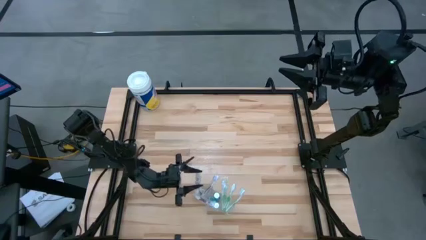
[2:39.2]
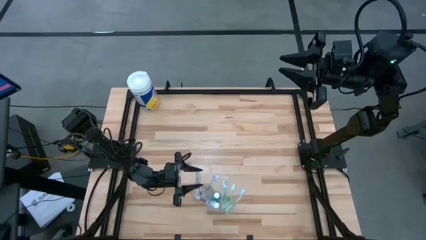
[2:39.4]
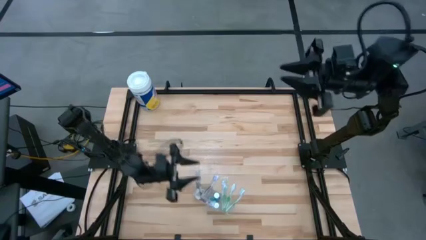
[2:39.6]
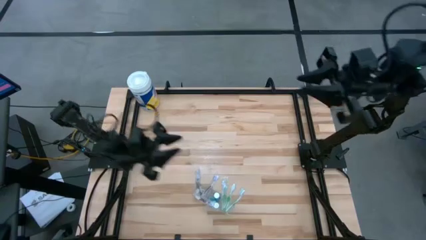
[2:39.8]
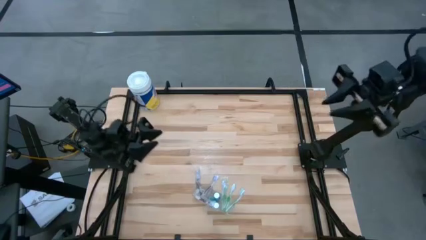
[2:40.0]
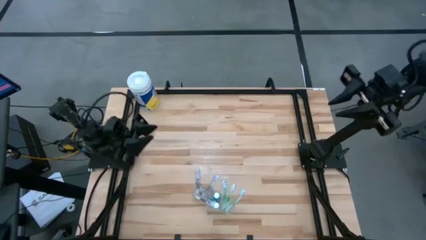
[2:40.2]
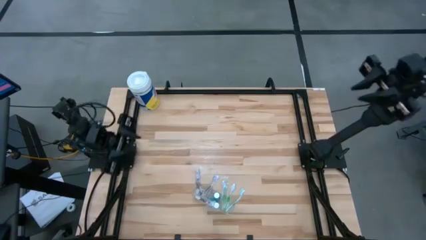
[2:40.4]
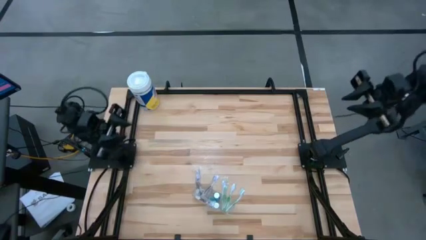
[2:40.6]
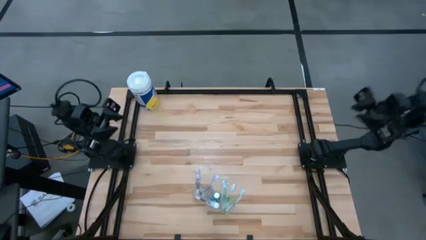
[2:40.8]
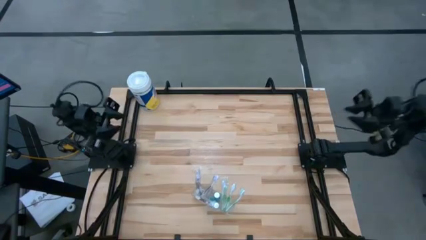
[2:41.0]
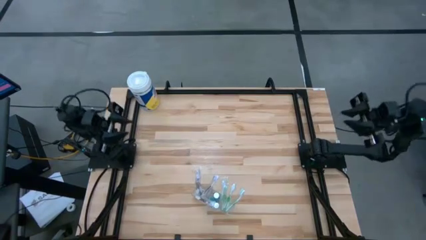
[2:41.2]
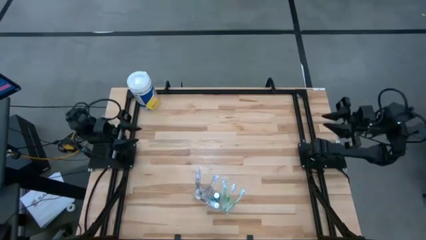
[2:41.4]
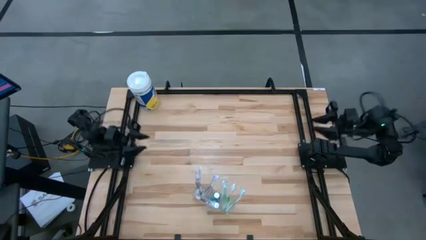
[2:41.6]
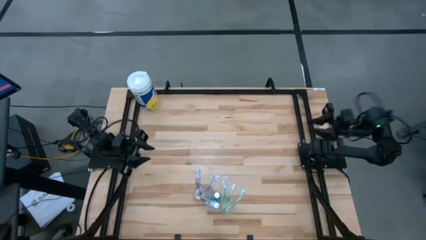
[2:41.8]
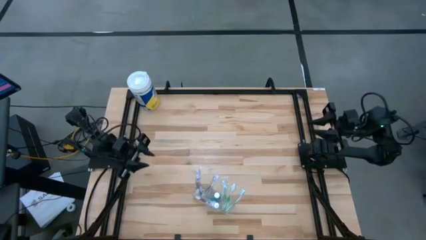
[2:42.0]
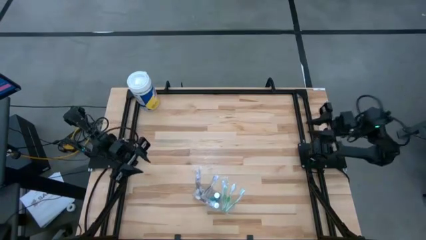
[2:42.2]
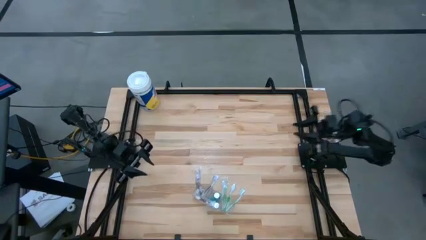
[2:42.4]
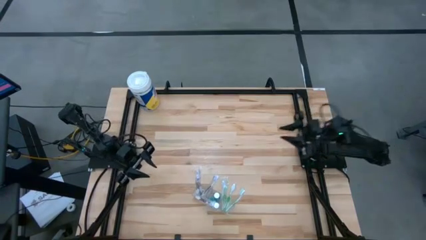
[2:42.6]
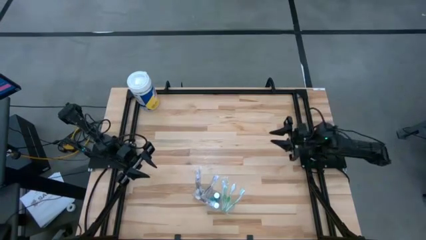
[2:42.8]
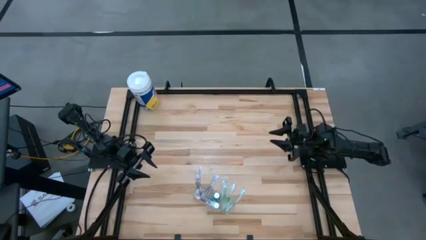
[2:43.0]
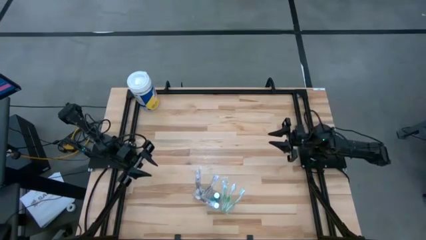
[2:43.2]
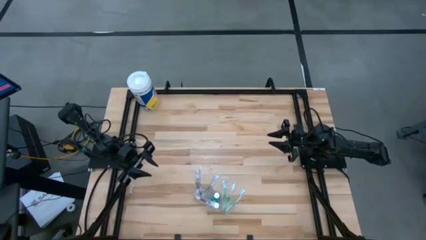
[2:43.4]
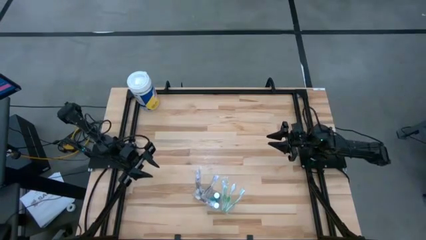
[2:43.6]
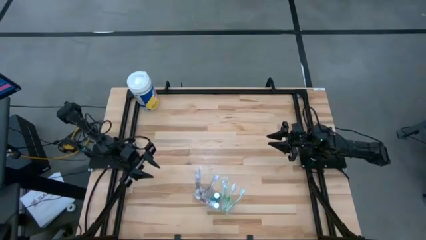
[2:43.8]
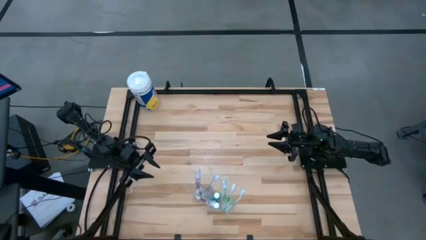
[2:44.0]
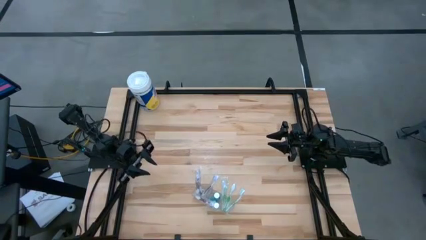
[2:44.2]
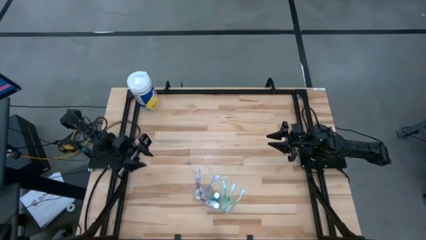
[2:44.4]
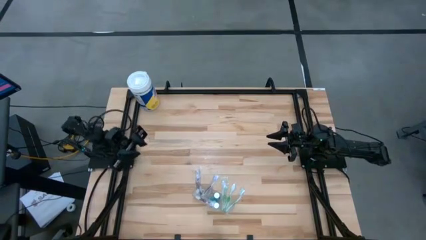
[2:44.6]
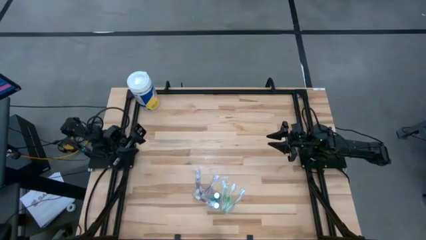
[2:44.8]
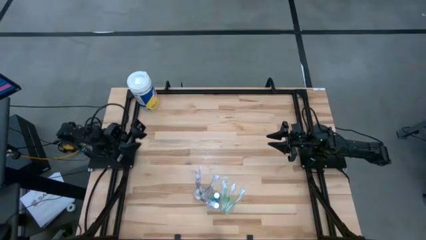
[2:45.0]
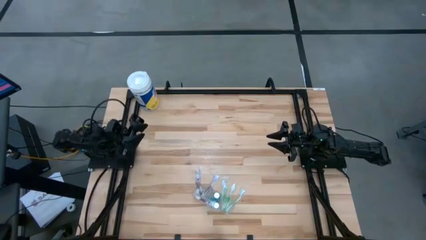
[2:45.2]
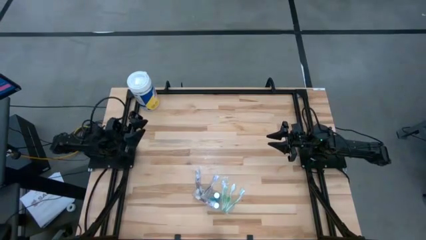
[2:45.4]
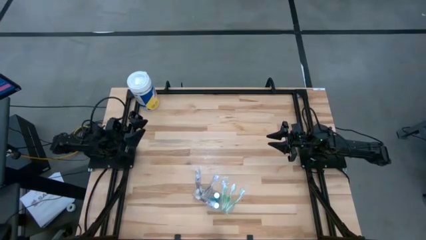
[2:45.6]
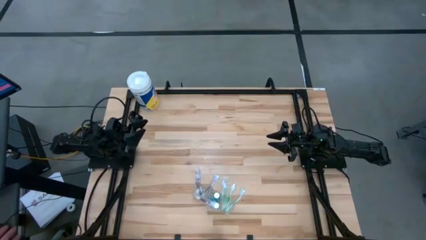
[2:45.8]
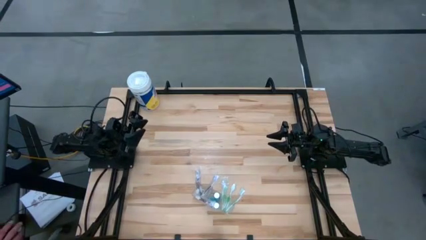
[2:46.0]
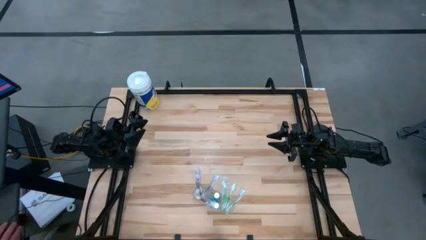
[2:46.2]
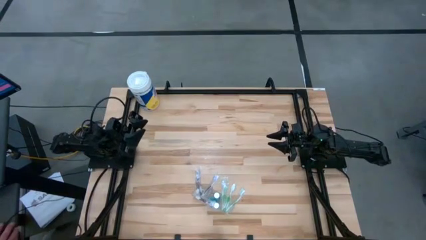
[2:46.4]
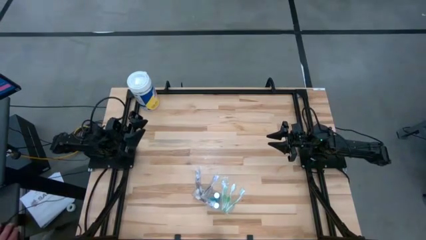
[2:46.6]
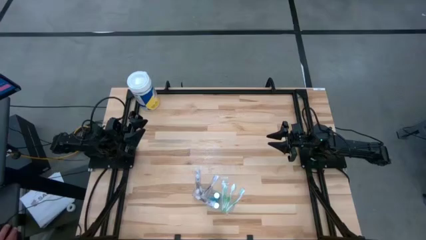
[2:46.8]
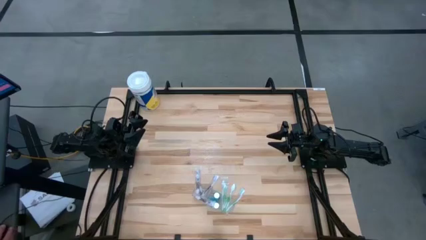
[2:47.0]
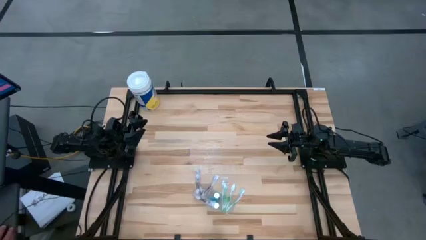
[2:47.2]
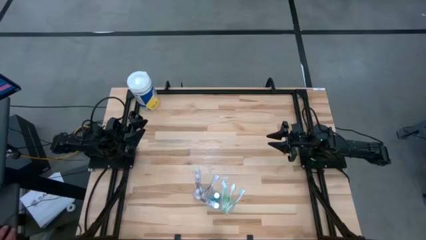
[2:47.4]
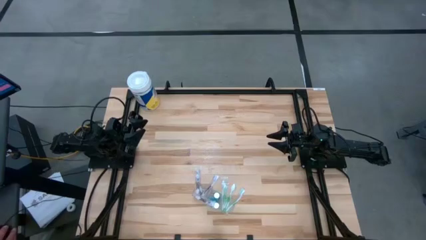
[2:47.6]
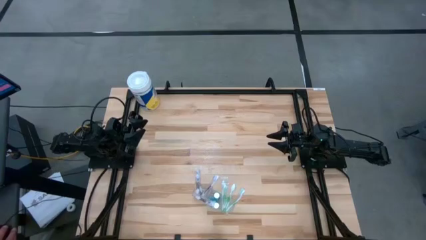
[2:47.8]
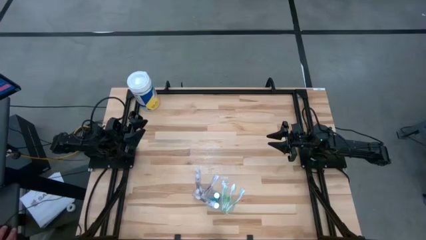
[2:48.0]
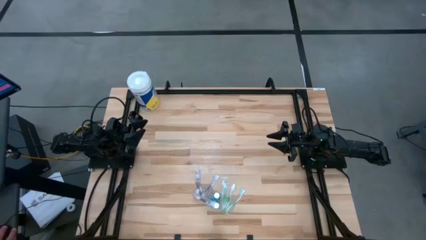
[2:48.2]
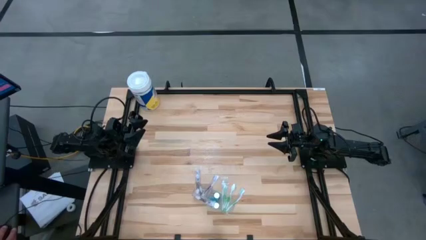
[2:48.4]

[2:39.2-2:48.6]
Task: Pick & Place toothbrushing station
Return to Home Position

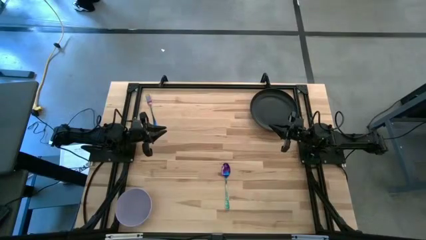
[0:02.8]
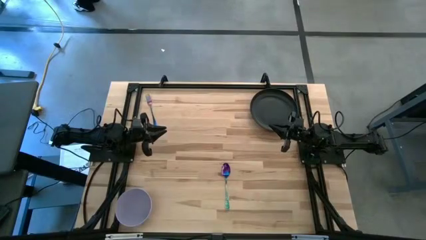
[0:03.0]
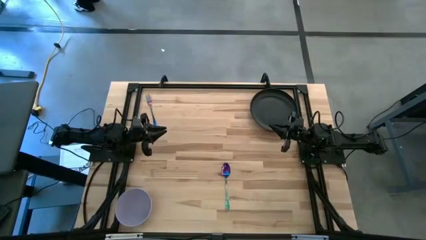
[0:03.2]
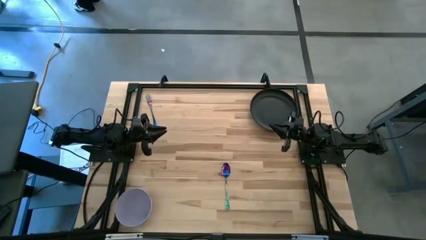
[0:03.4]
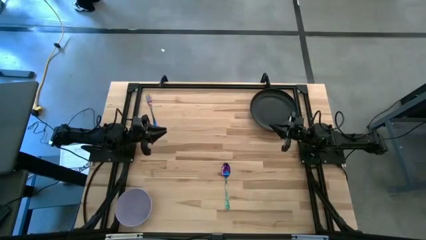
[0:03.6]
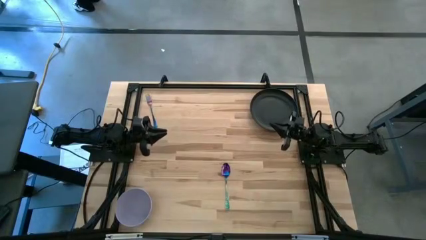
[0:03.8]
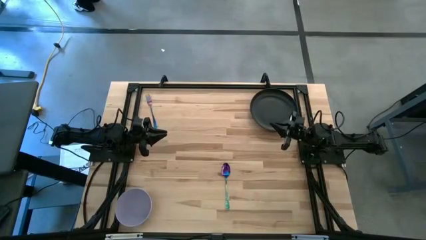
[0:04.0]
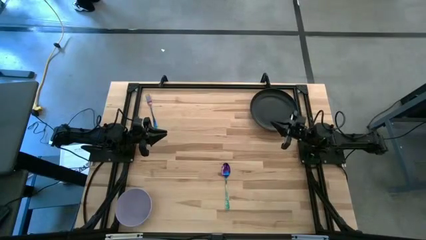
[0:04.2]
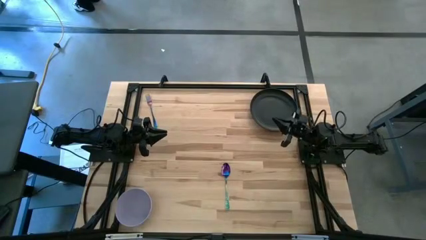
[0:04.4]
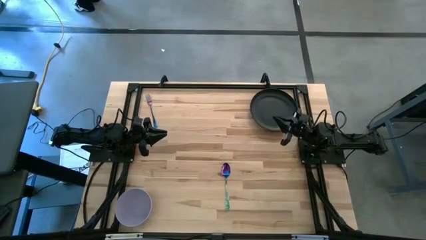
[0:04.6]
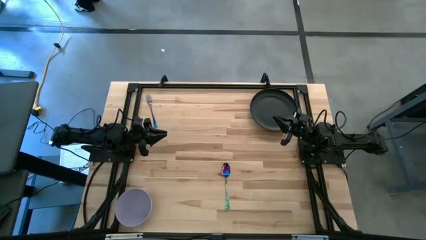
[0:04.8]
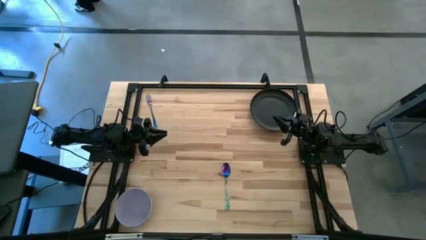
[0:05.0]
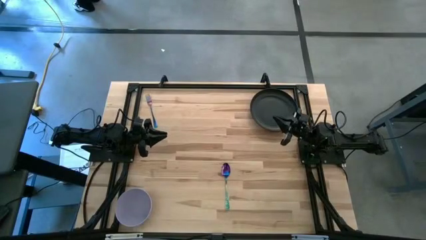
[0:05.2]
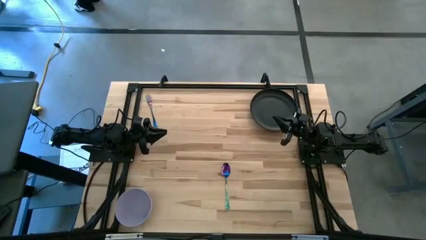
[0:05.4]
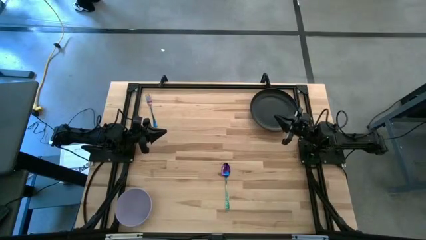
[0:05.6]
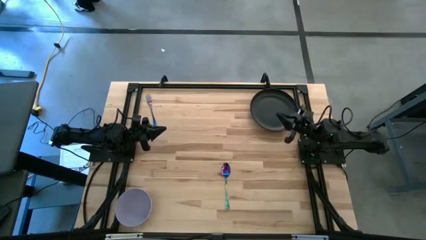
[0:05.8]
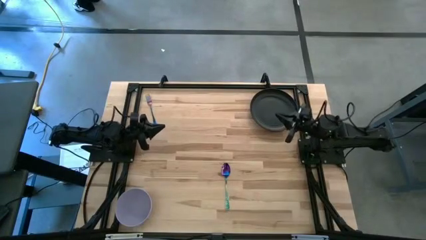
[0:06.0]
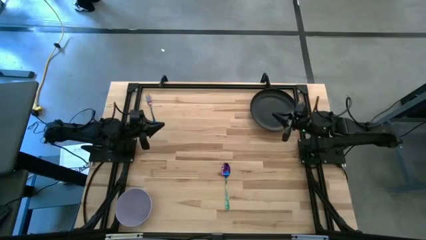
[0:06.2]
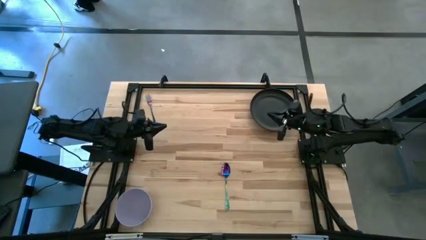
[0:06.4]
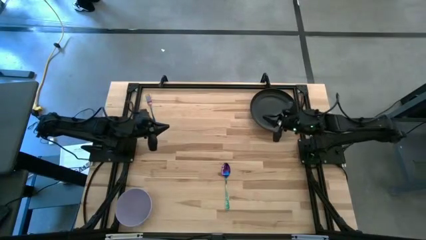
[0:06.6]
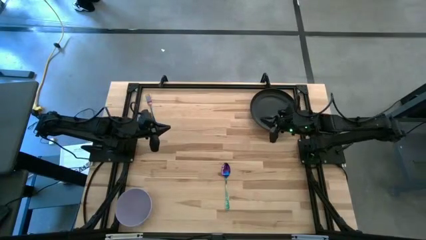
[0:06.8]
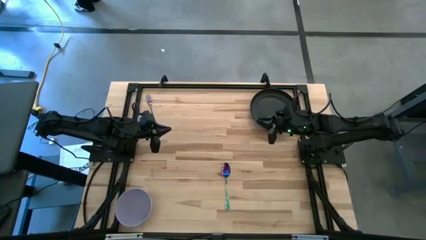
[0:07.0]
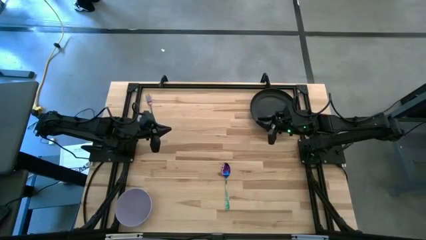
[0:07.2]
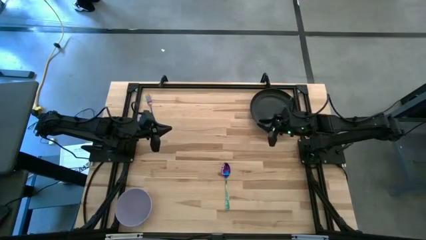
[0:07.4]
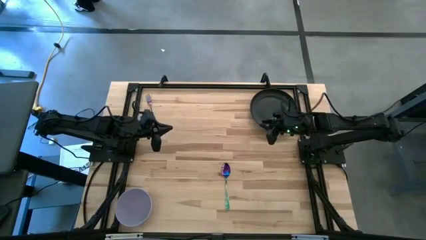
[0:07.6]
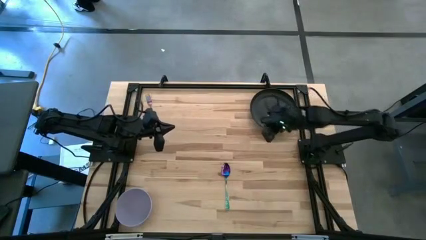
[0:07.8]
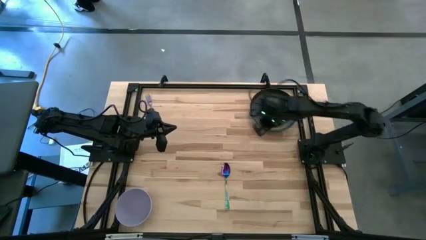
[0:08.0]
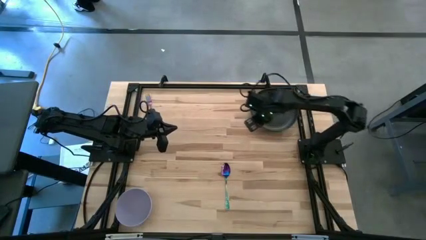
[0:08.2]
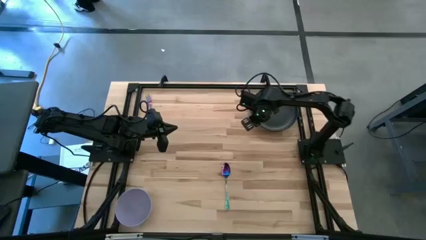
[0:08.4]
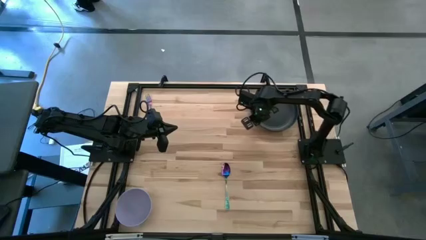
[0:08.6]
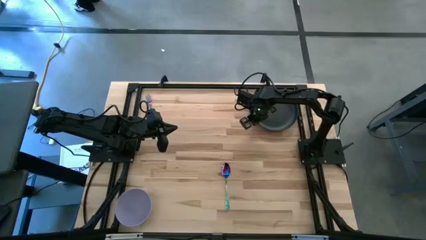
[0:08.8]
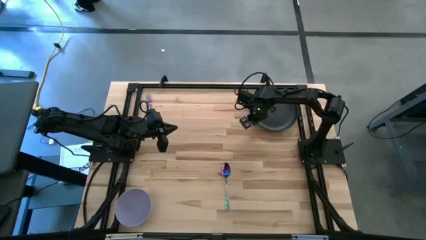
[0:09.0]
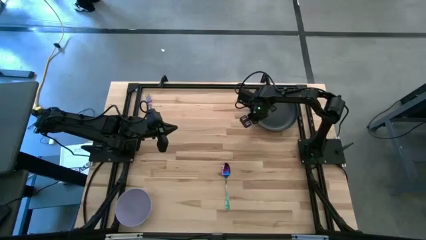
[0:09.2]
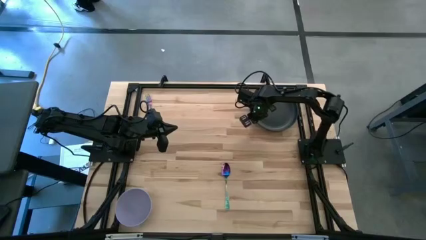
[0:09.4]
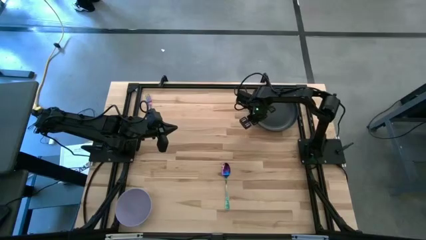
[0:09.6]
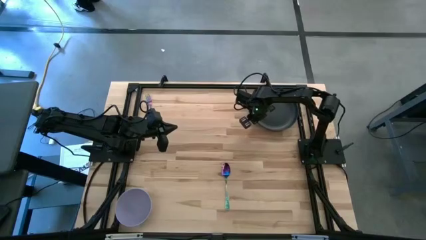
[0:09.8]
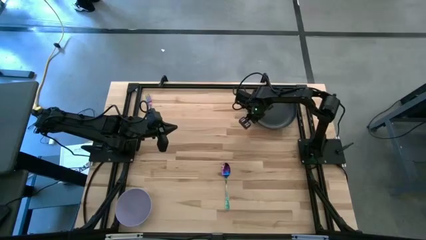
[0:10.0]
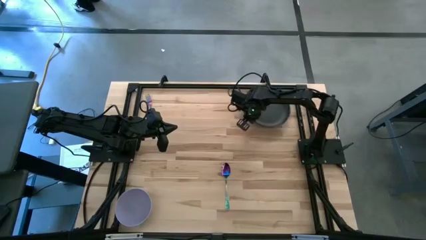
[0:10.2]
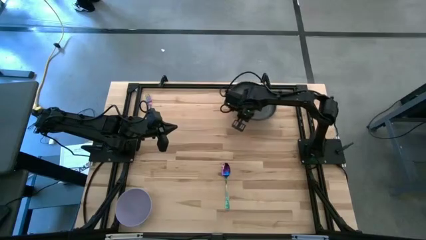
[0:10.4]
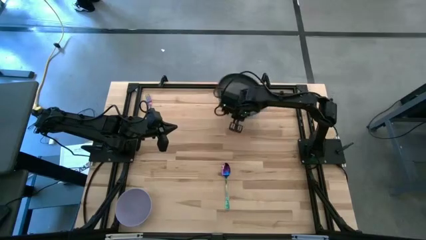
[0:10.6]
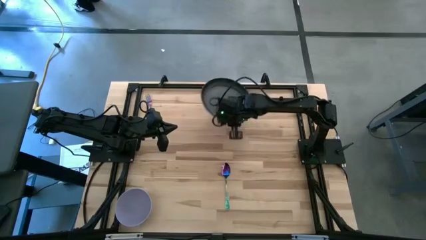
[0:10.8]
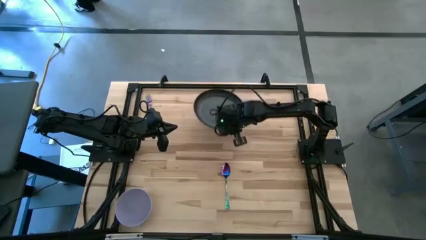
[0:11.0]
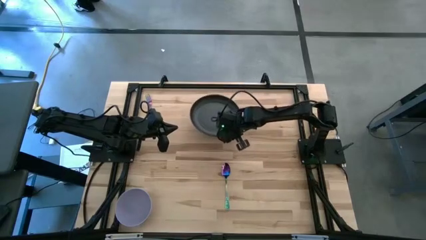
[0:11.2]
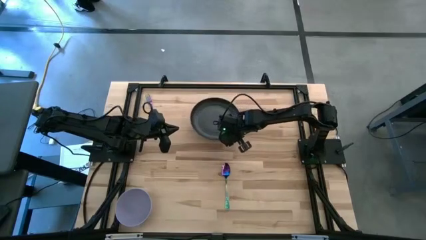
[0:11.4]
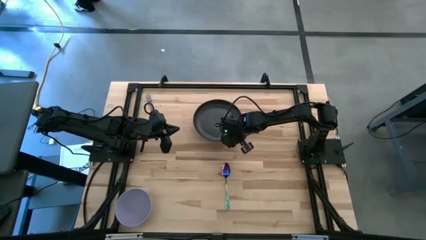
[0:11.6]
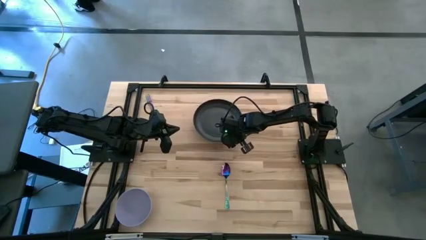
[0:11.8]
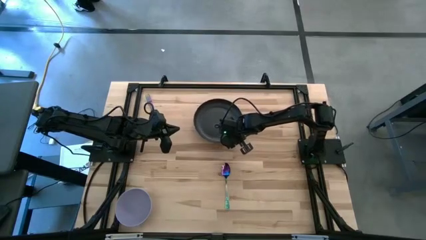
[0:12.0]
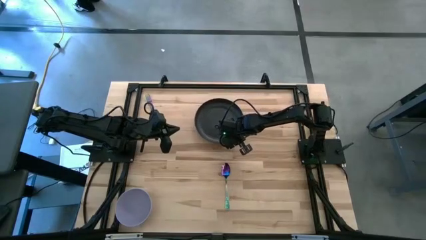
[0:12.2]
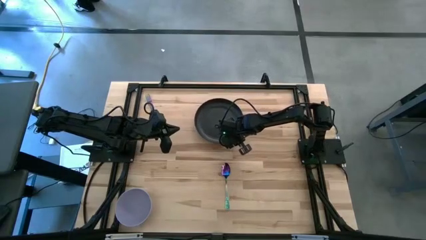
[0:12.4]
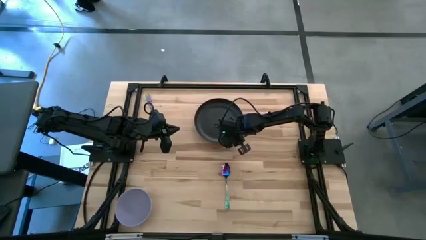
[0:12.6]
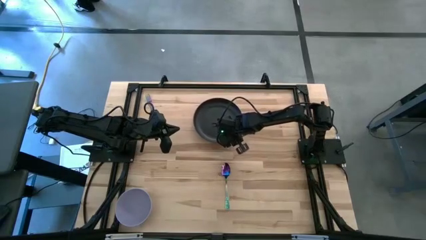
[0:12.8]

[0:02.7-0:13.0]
Task: Set table place
Move the black plate to the top center of the table
